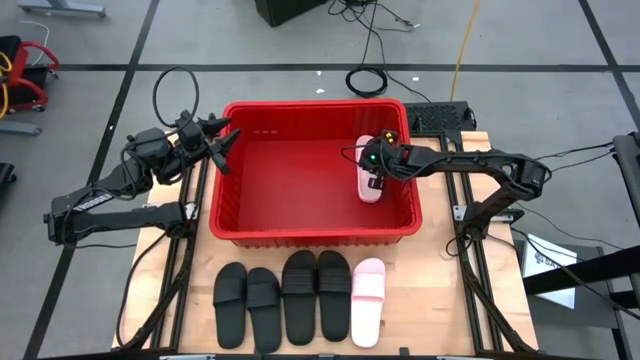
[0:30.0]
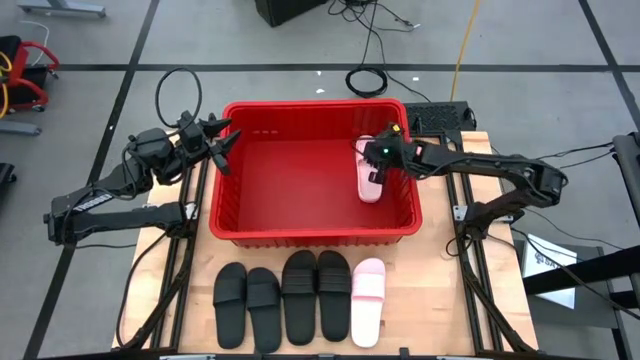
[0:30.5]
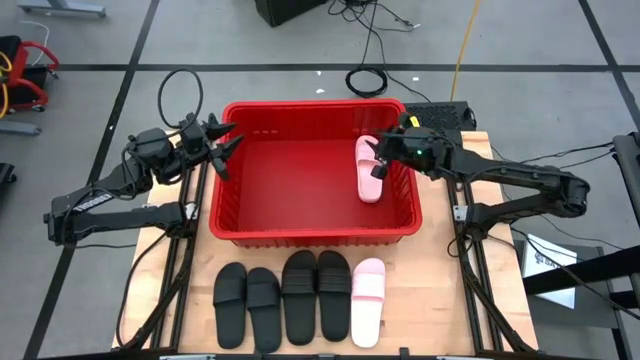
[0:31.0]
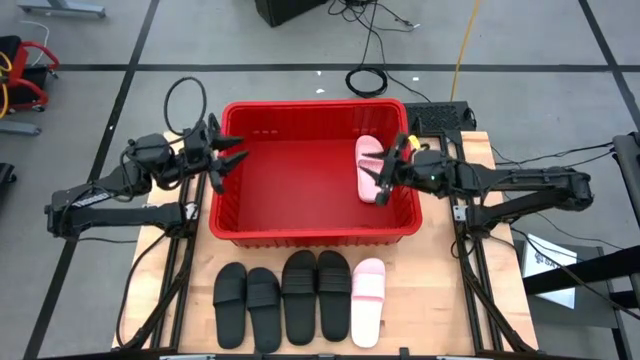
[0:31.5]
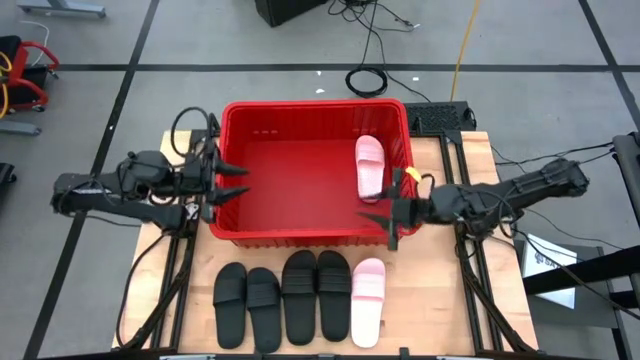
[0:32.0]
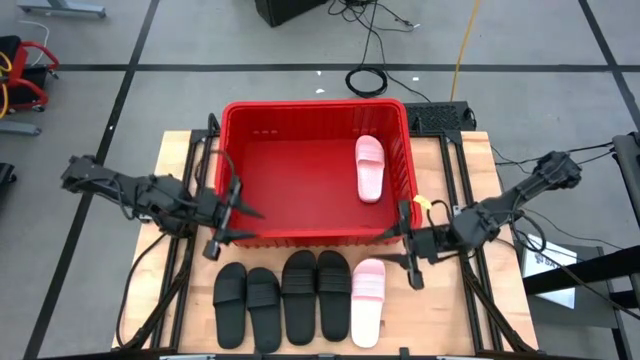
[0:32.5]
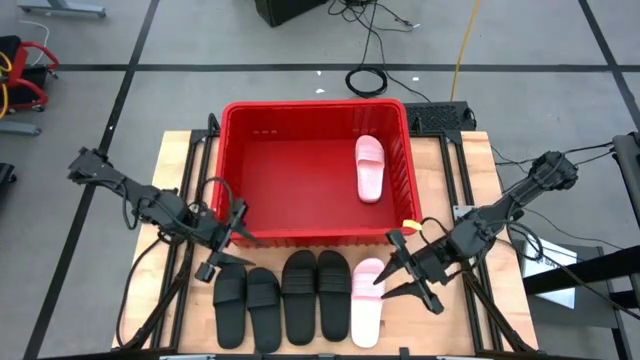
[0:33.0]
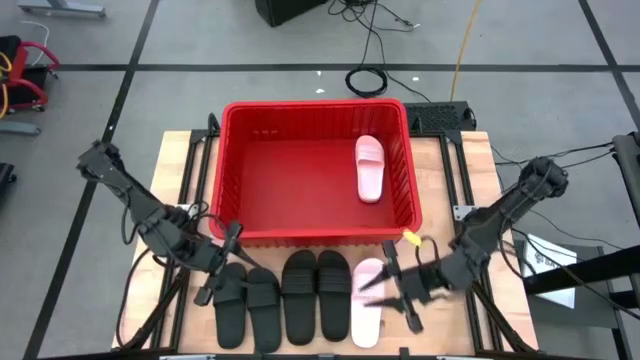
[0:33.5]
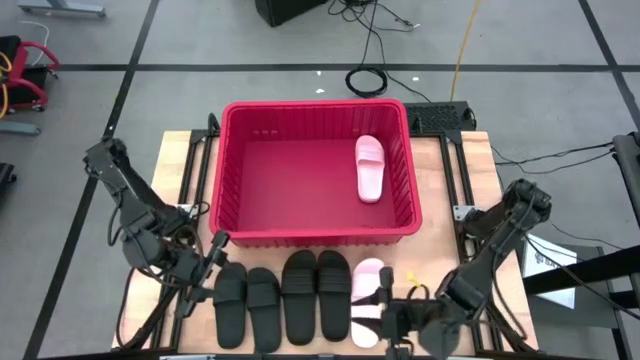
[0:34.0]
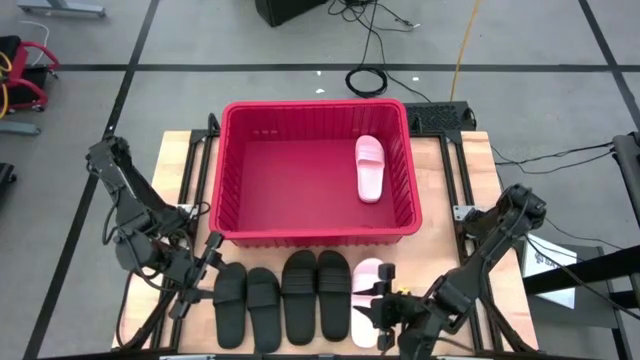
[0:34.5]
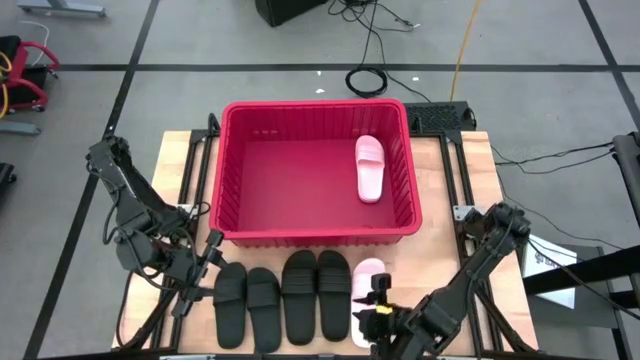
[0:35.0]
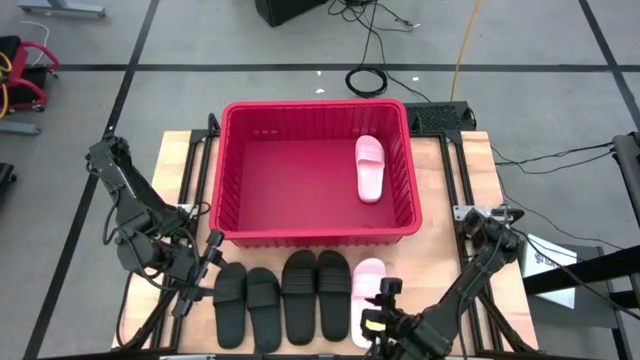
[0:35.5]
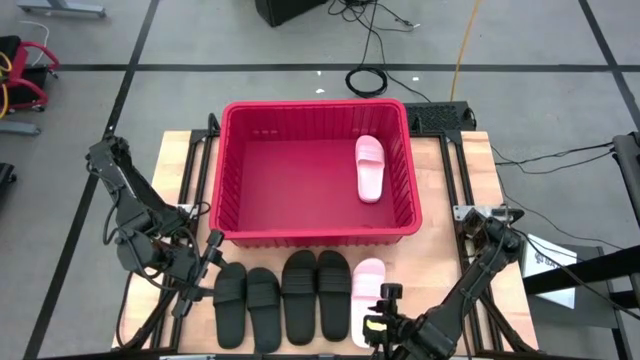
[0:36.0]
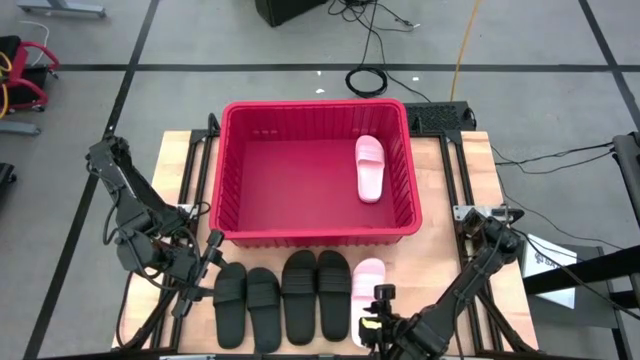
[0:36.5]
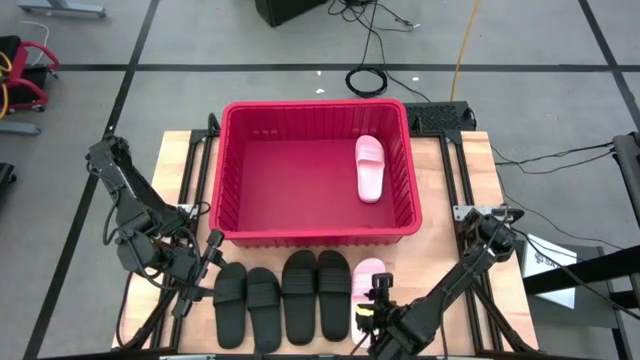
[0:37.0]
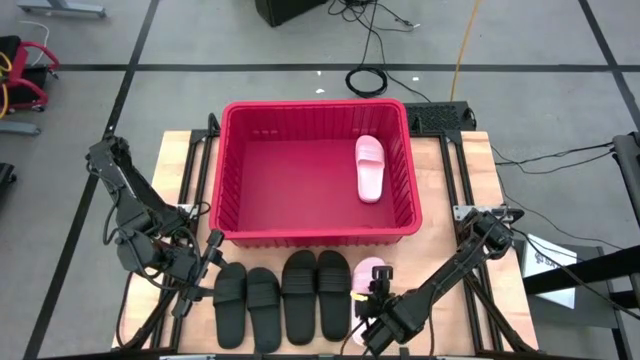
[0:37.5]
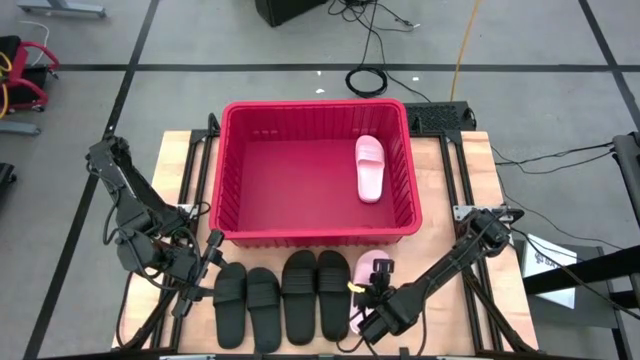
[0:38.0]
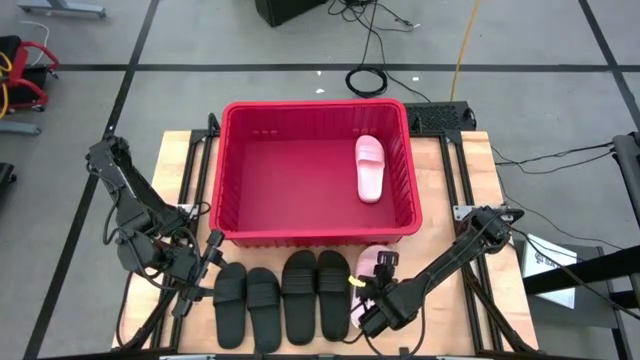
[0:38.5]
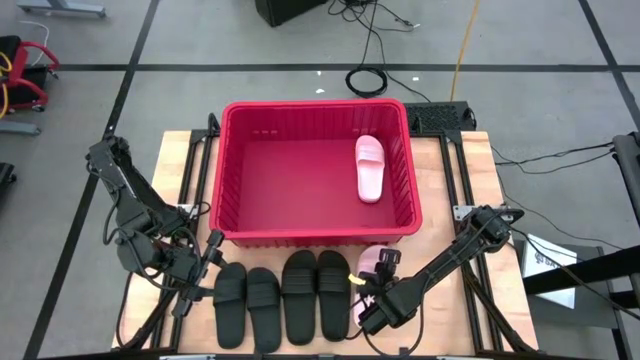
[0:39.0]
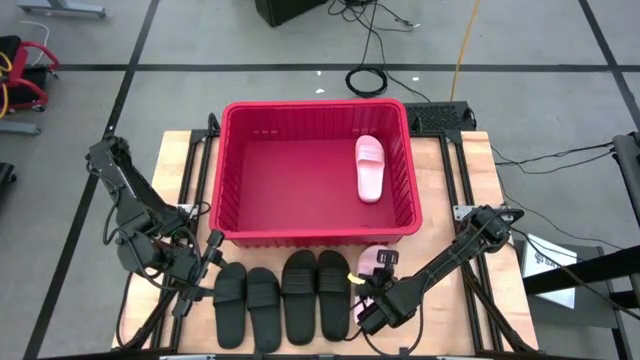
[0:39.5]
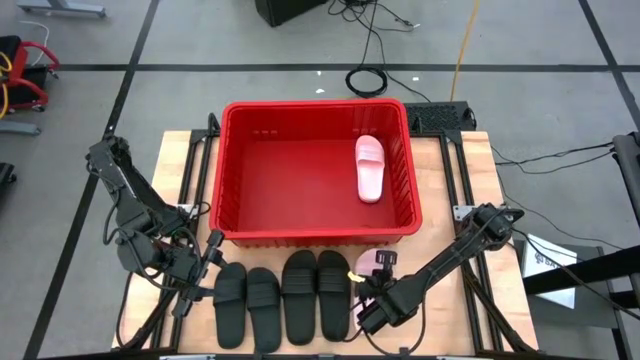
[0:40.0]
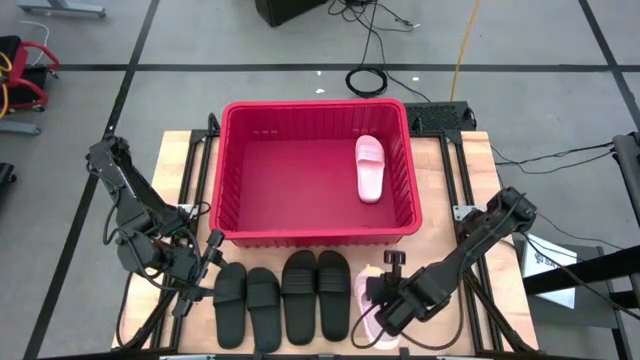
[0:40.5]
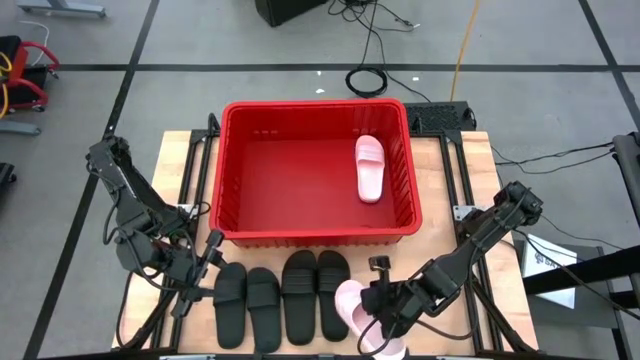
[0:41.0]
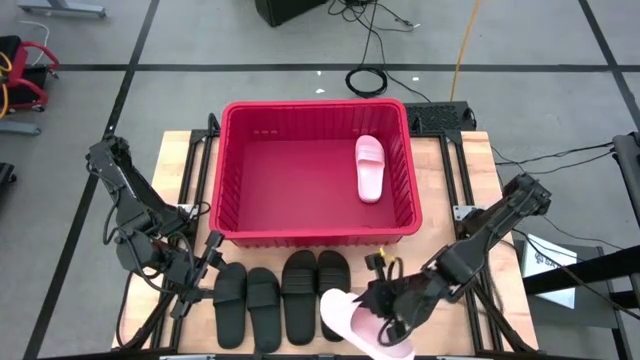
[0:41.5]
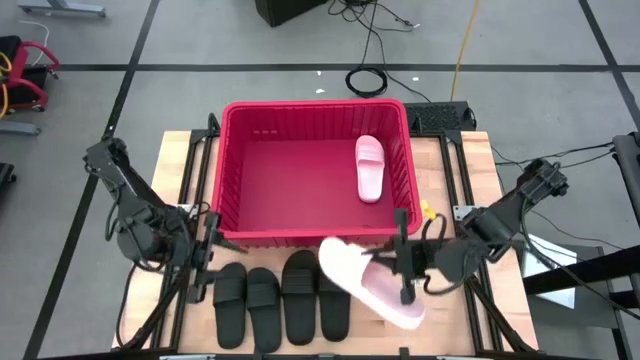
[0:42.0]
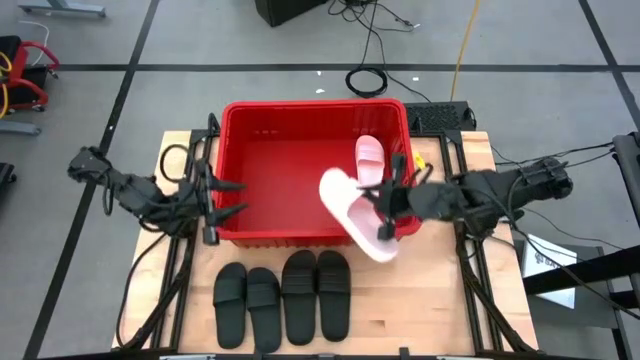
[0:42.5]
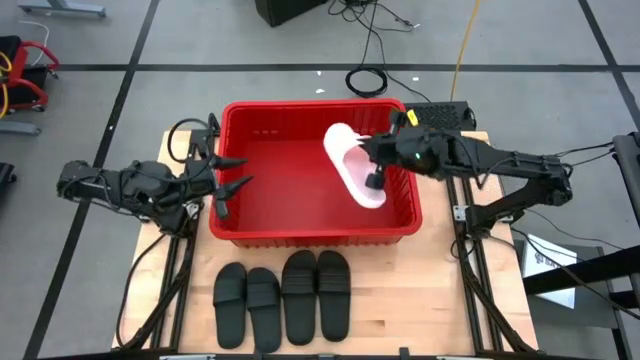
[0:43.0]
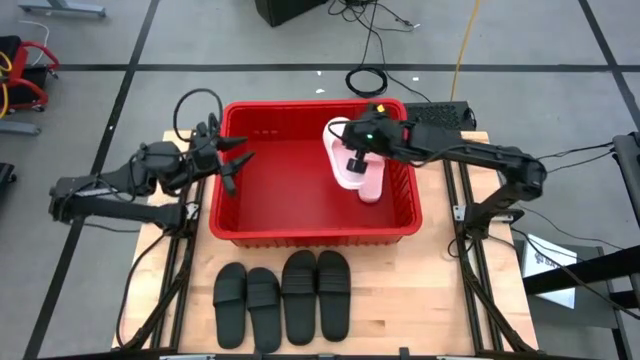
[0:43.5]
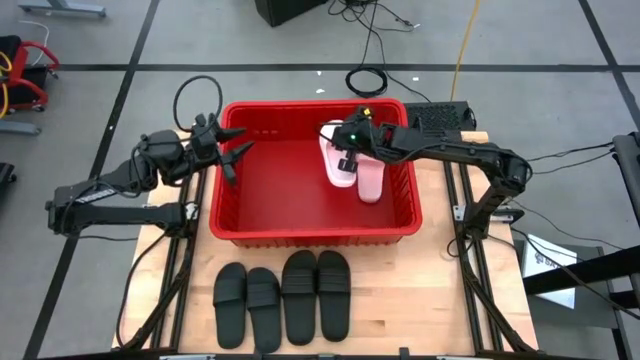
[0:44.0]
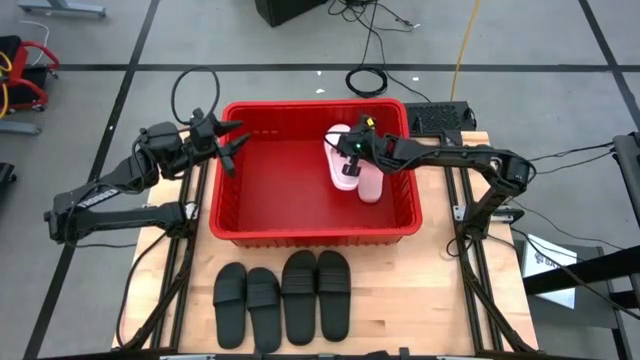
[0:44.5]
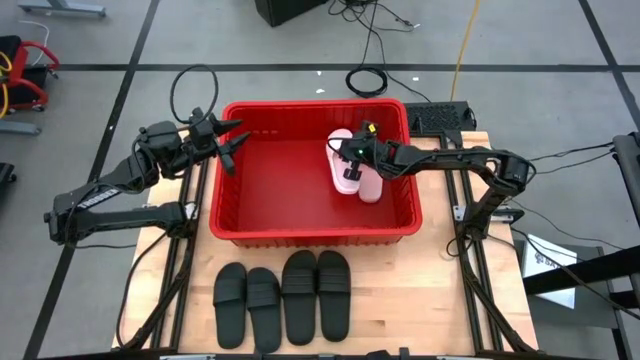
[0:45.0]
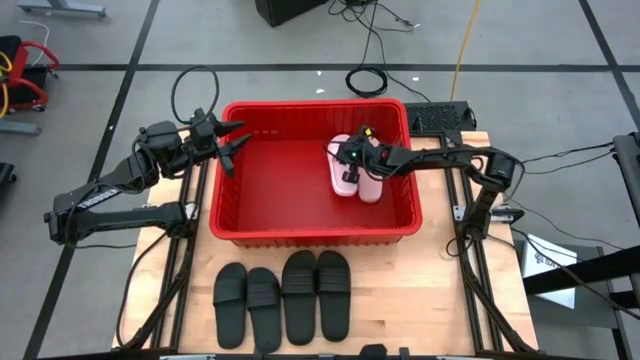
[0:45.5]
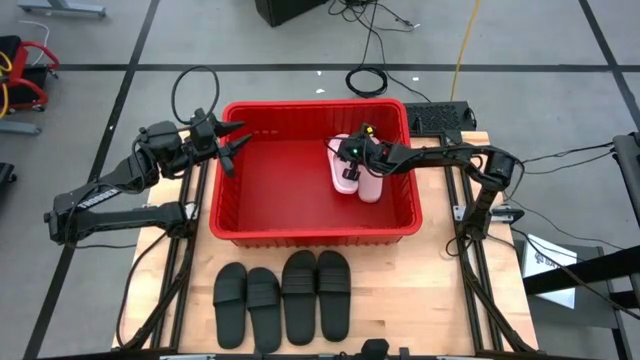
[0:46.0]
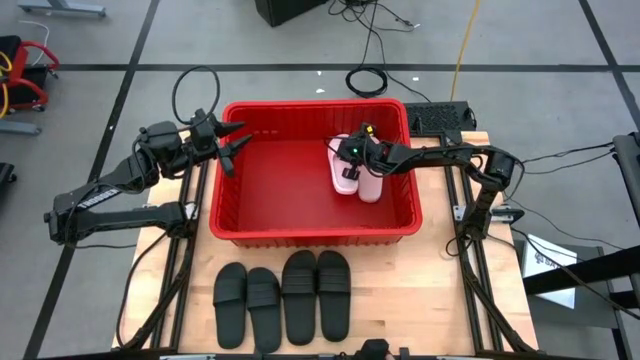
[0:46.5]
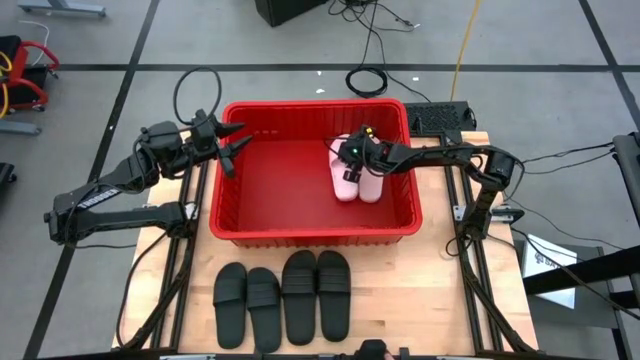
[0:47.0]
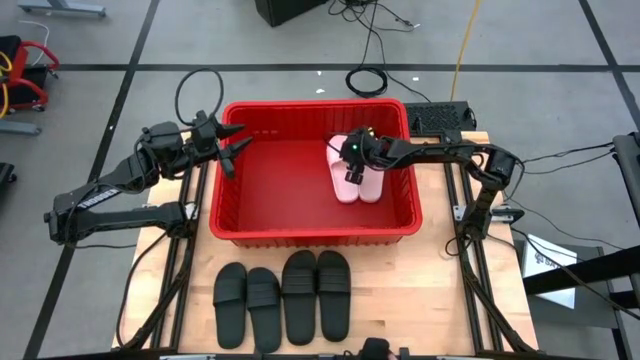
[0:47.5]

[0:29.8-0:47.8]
Task: Pick and place slides into bin
Put the pink slipper into the red bin
